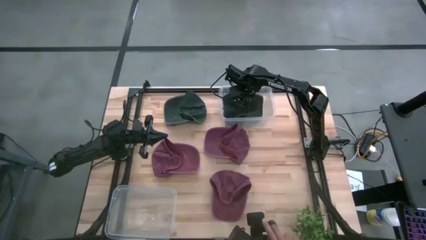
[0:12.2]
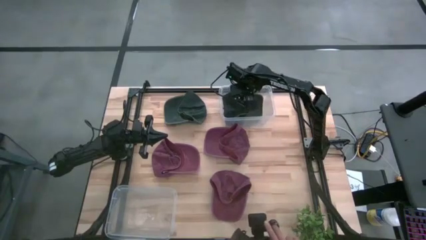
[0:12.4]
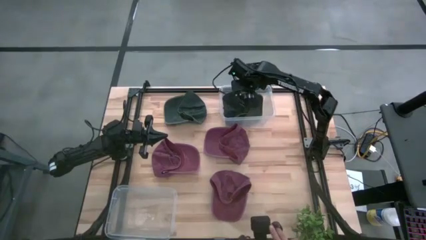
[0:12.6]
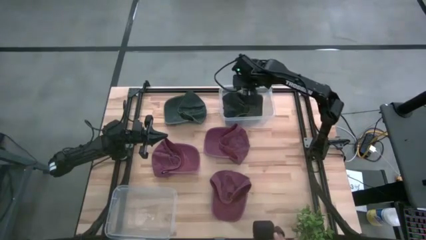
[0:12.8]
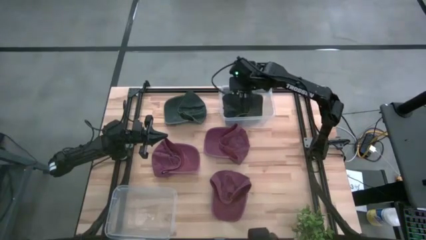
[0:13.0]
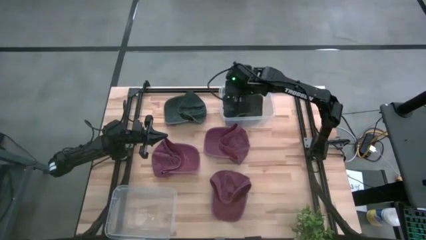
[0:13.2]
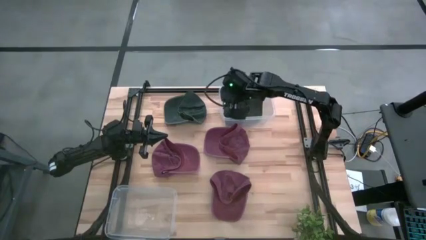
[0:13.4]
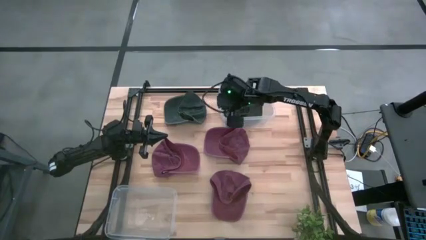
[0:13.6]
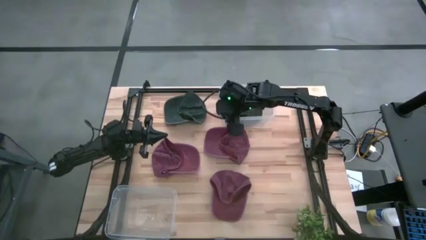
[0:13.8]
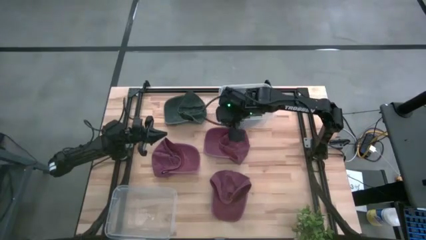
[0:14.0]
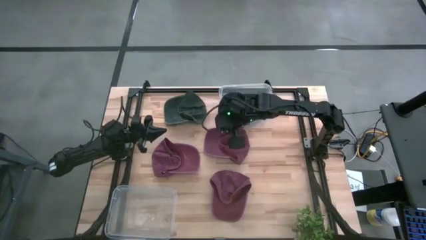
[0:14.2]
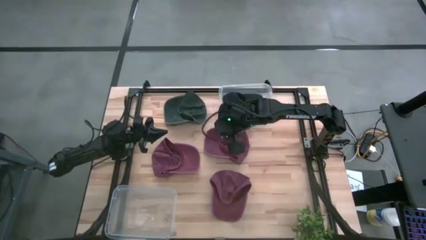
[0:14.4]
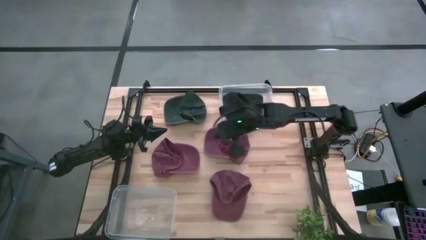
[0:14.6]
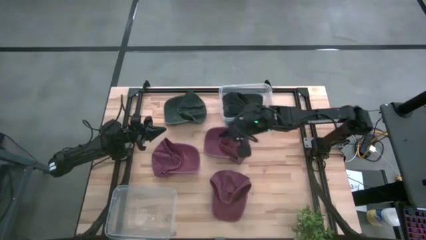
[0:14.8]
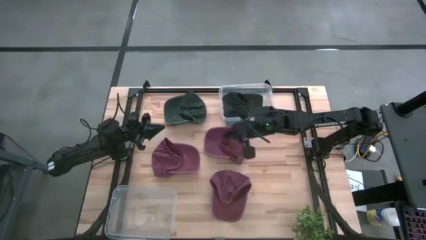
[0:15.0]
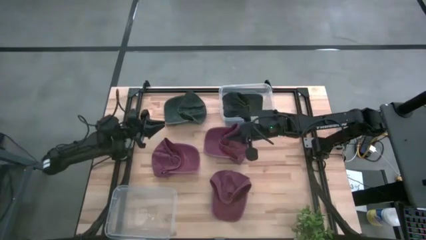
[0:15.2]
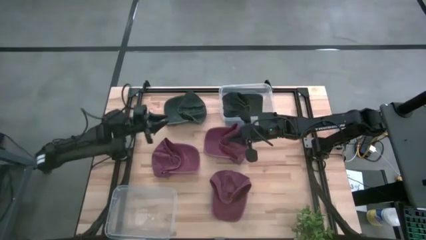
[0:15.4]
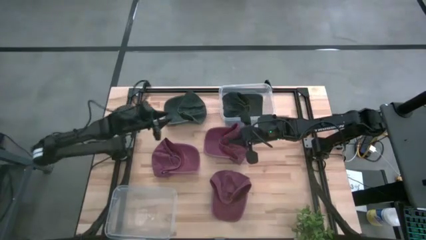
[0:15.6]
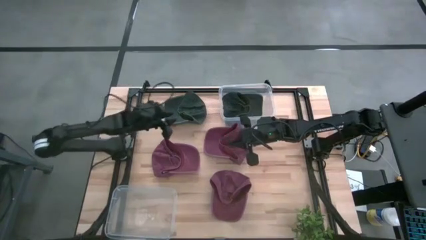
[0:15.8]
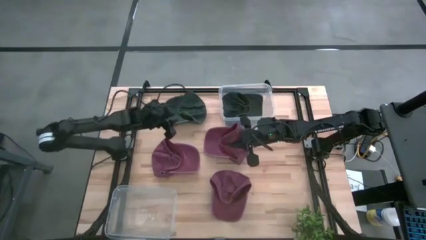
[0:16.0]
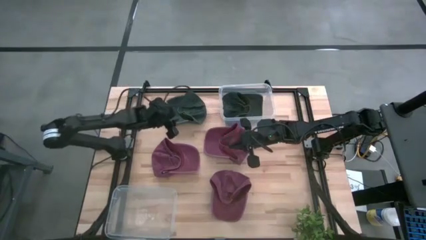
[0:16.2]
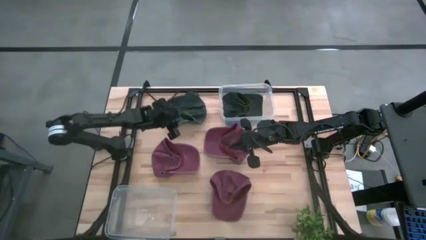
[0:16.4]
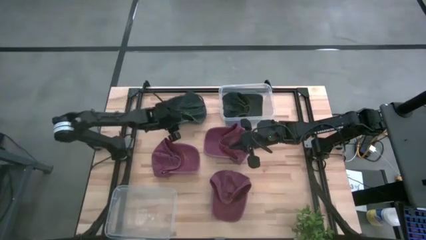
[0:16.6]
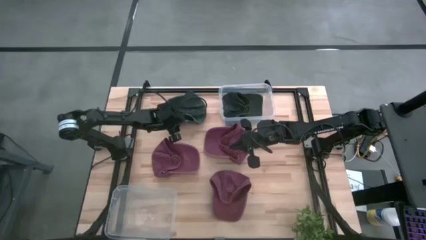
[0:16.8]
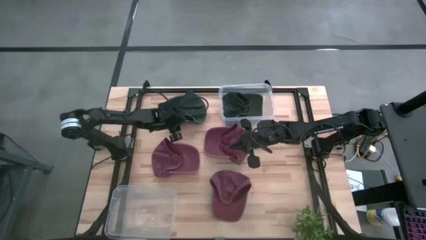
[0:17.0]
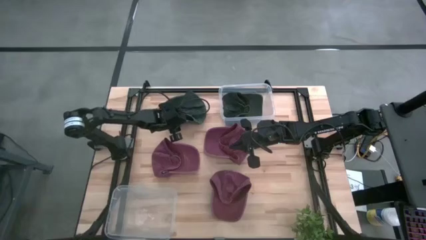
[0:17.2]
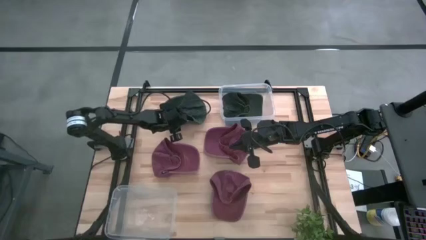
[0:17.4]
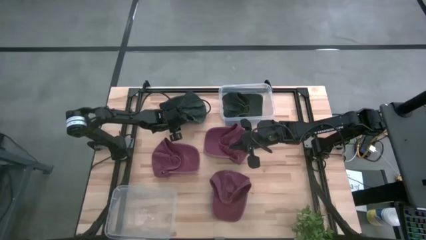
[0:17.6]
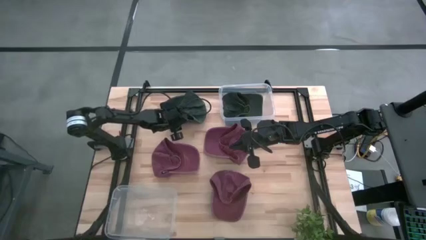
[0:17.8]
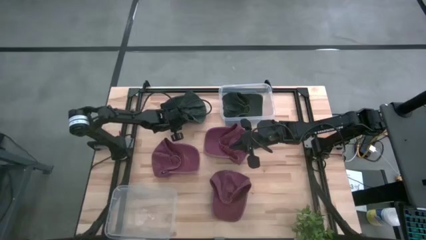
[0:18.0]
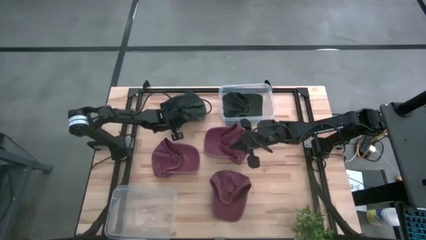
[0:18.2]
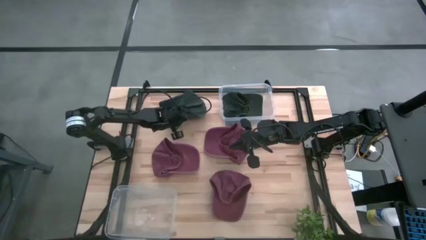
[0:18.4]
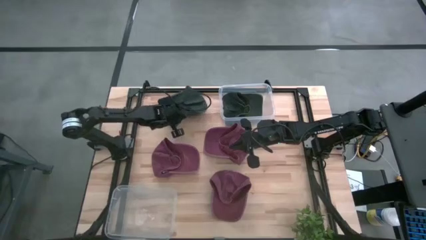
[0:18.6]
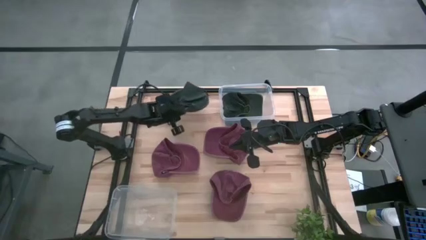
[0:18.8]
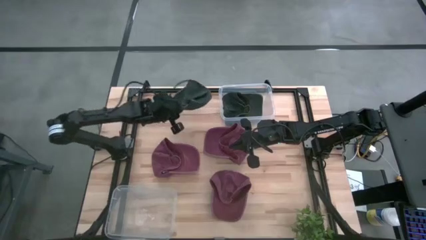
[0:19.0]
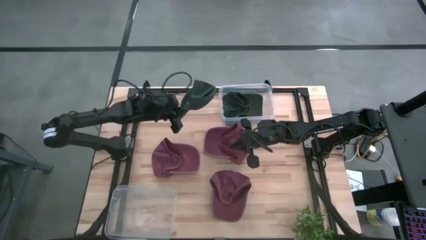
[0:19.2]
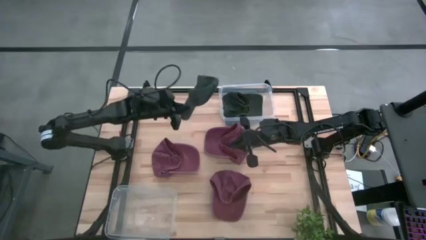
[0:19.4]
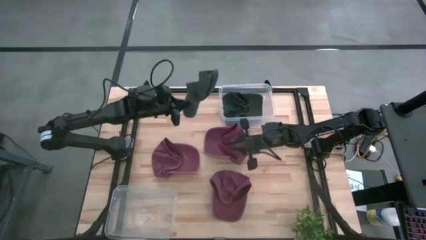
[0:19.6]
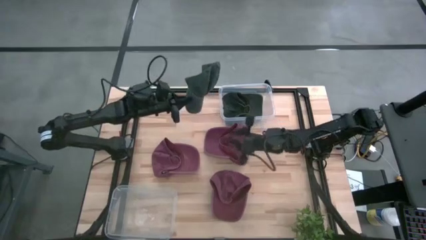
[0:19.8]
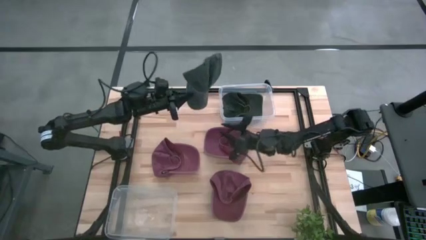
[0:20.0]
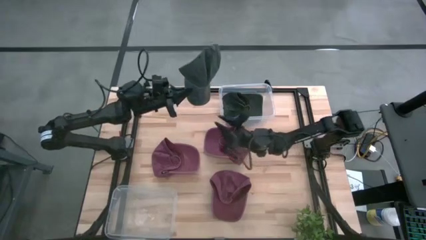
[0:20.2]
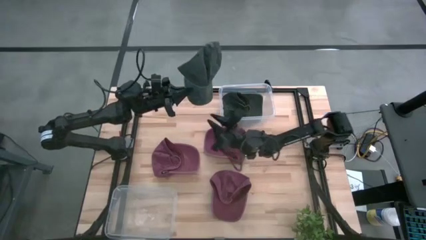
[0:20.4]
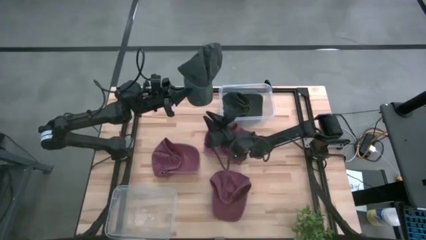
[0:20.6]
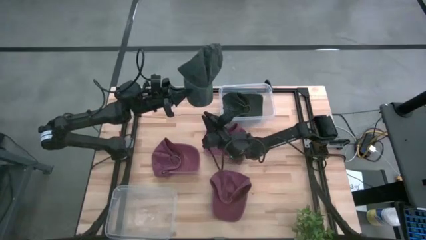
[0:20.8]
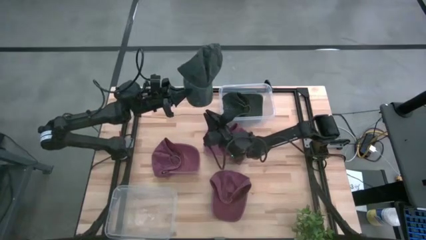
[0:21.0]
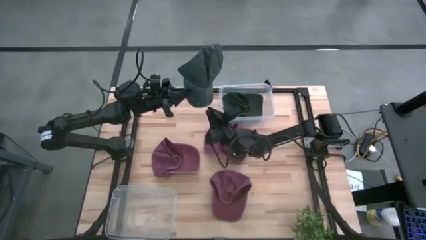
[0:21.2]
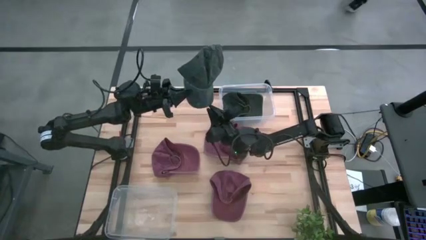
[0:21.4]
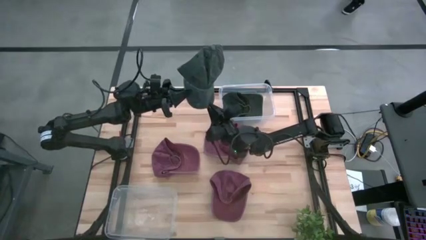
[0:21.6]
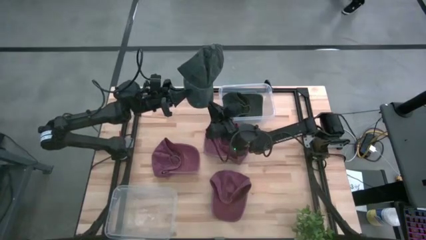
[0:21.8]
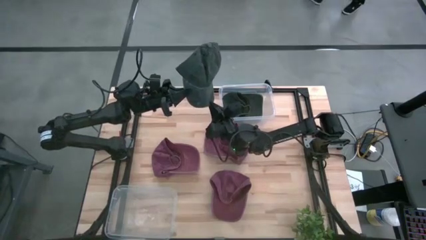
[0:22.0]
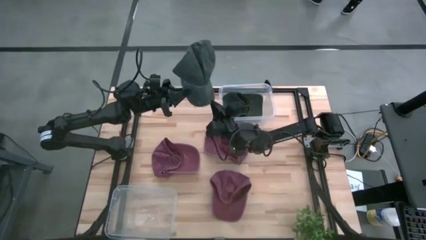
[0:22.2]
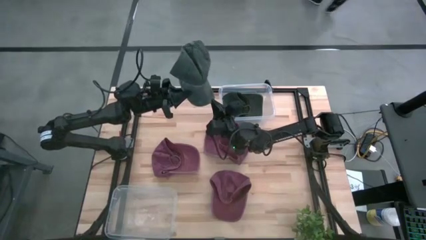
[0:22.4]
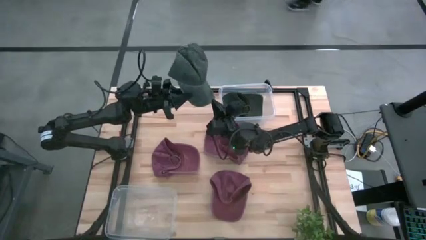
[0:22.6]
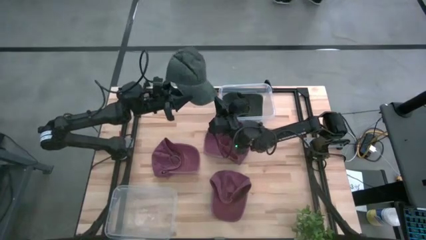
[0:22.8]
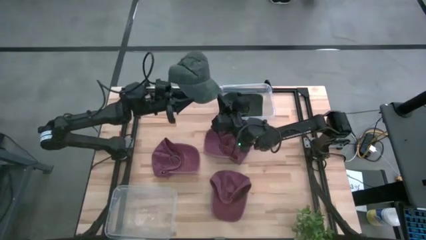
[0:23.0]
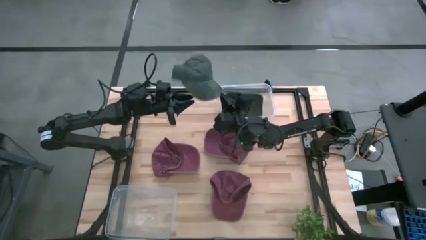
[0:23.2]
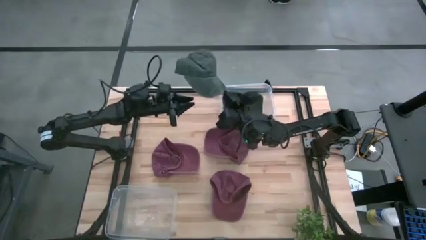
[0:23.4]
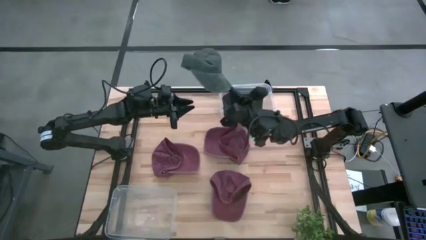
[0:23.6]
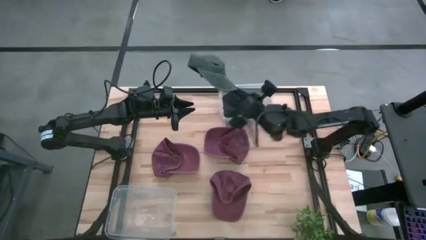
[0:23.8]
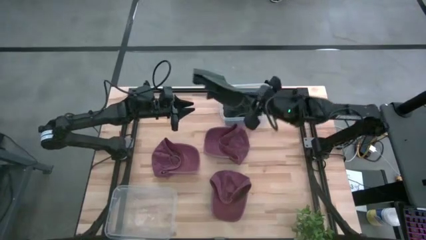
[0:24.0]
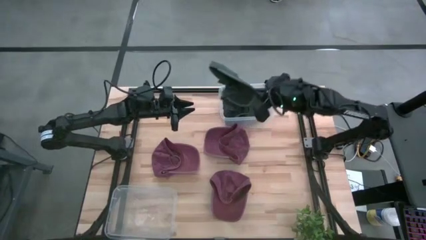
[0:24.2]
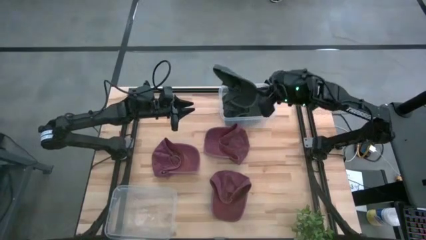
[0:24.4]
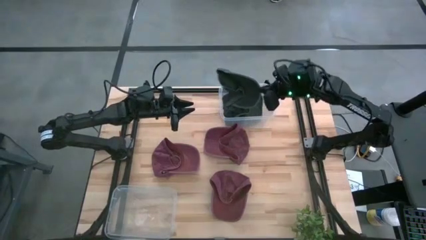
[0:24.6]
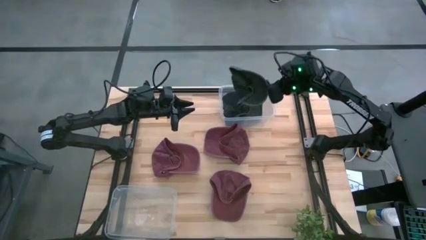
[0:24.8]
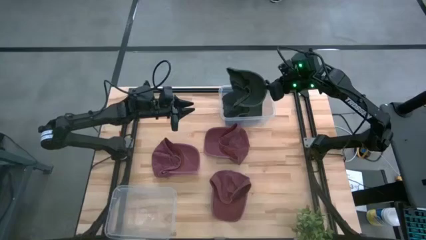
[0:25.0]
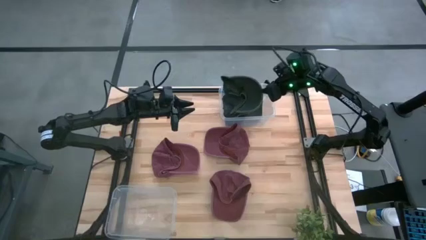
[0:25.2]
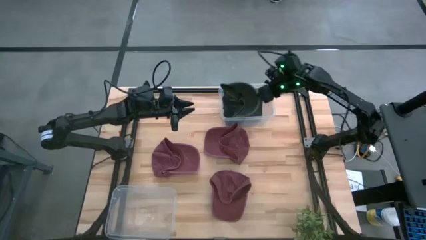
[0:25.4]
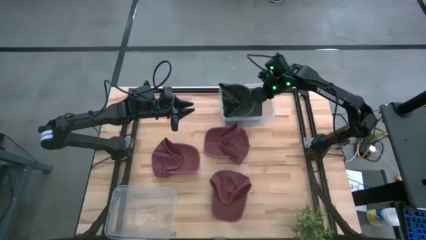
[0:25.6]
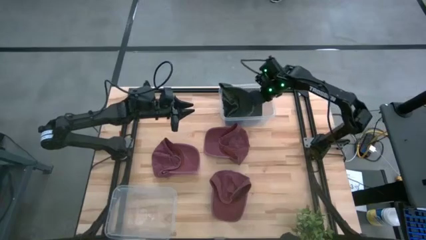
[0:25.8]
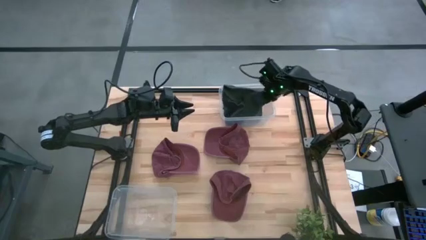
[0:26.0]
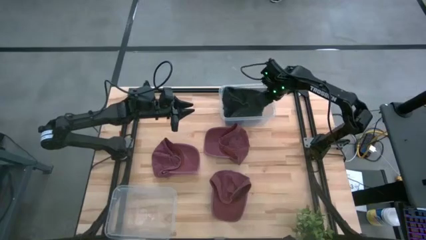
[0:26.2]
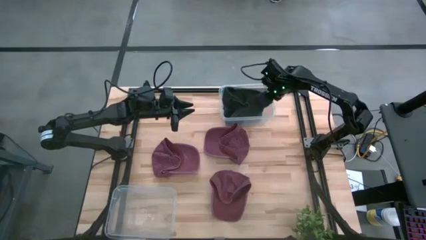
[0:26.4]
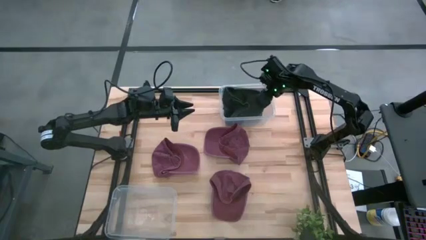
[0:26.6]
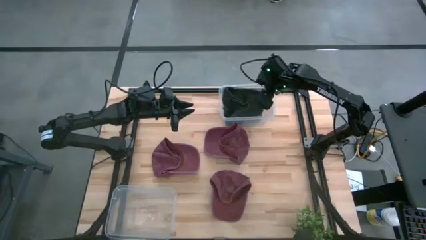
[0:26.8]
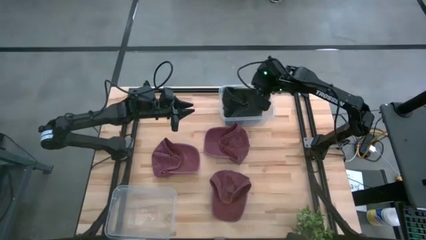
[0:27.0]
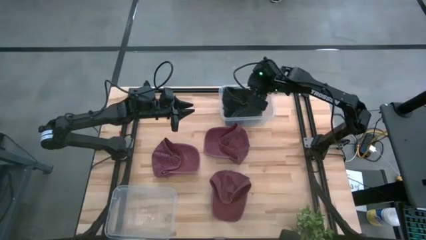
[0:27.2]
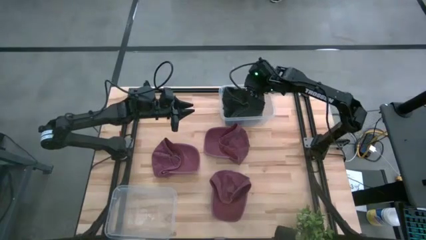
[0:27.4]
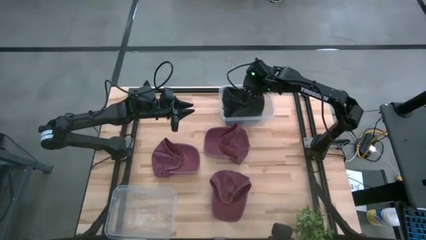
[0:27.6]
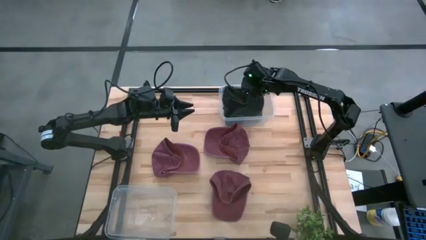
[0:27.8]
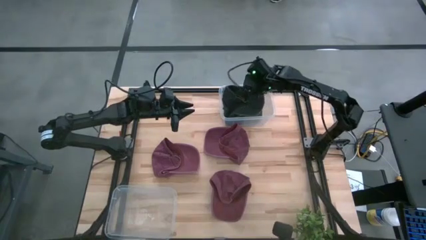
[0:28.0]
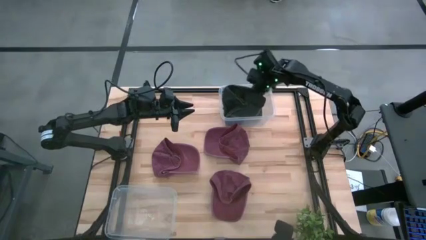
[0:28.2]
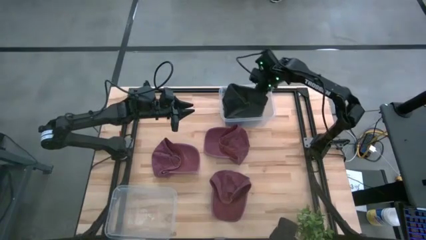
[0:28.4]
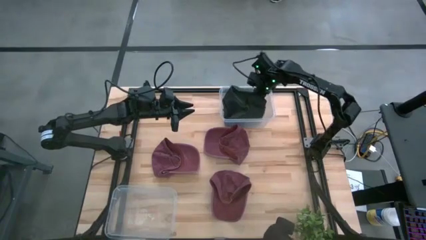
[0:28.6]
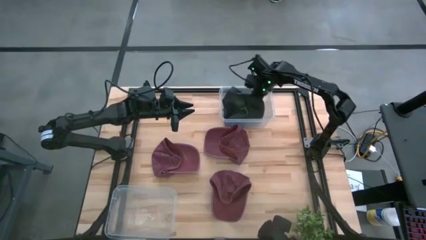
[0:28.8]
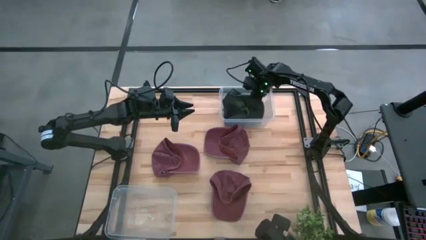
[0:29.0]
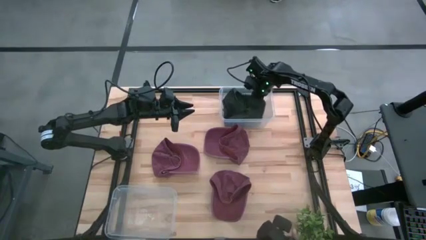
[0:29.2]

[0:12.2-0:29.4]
Task: Pick & Place hat
Put the gray cap into the top transparent bin
